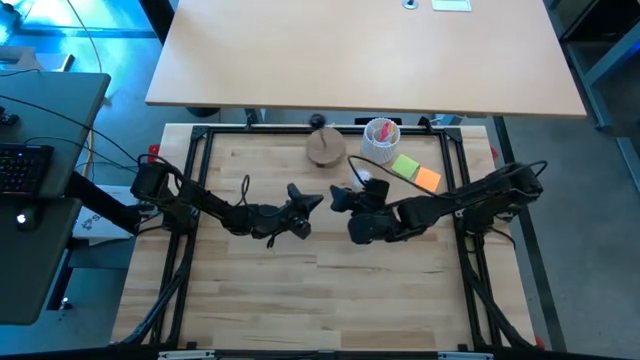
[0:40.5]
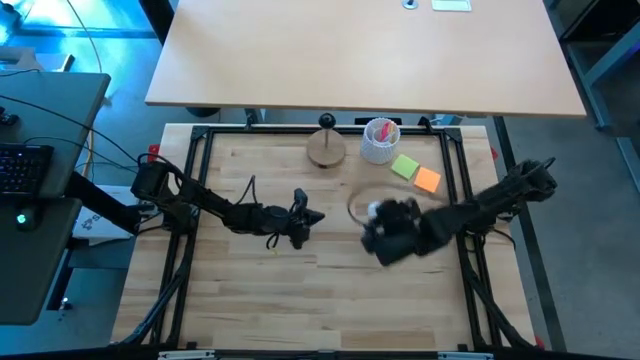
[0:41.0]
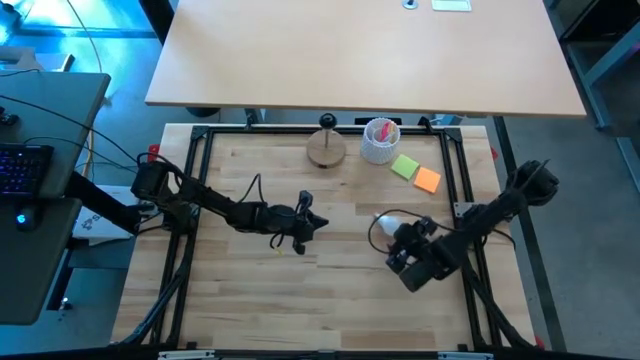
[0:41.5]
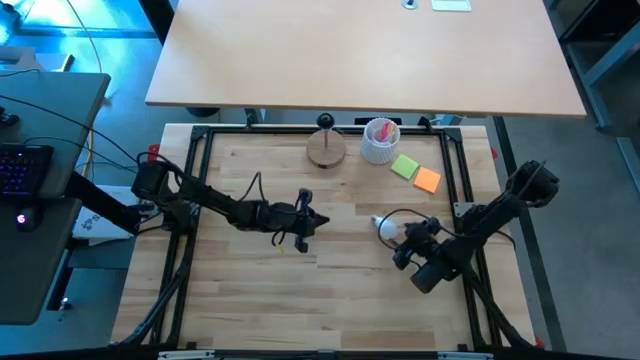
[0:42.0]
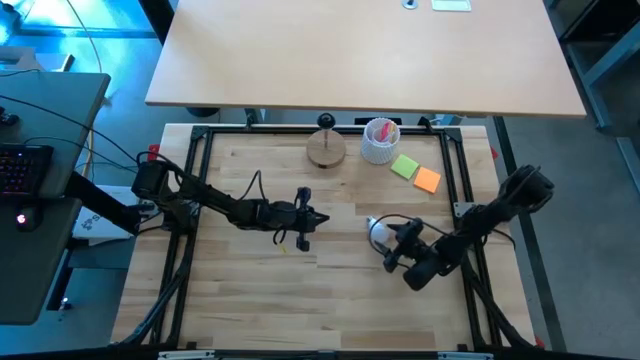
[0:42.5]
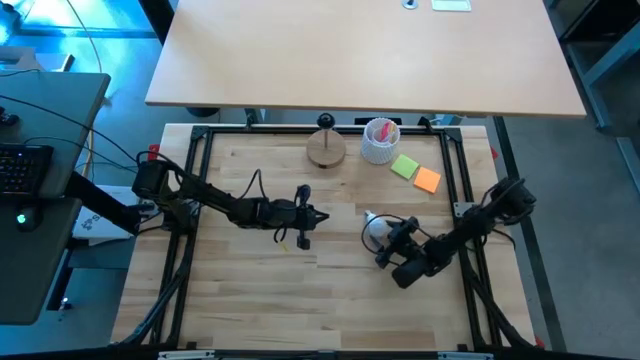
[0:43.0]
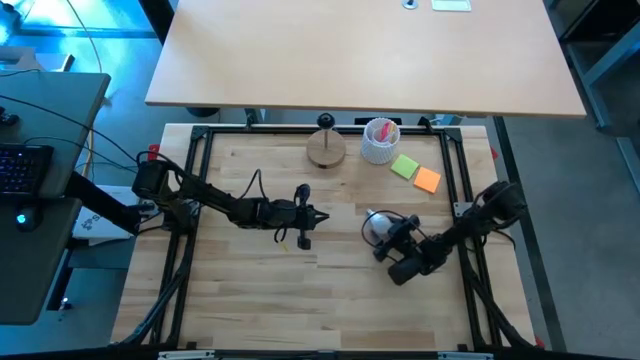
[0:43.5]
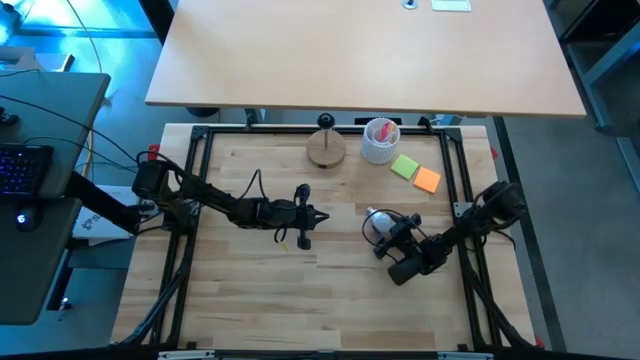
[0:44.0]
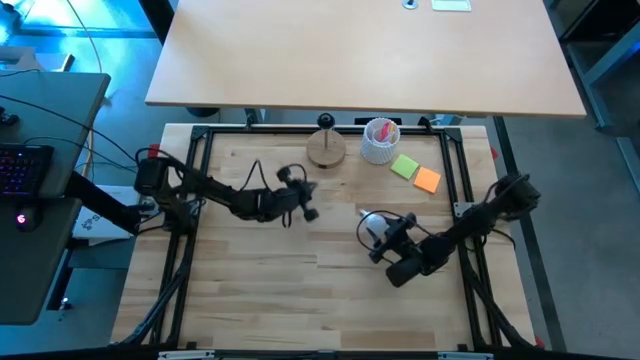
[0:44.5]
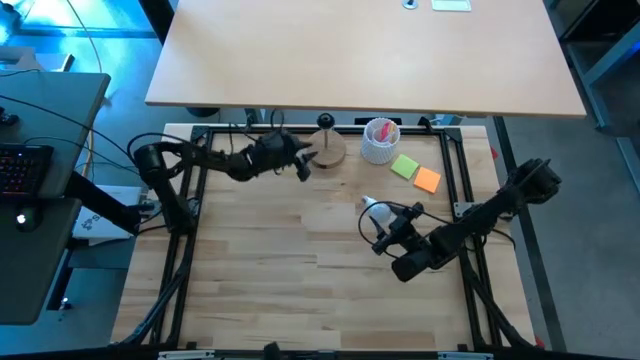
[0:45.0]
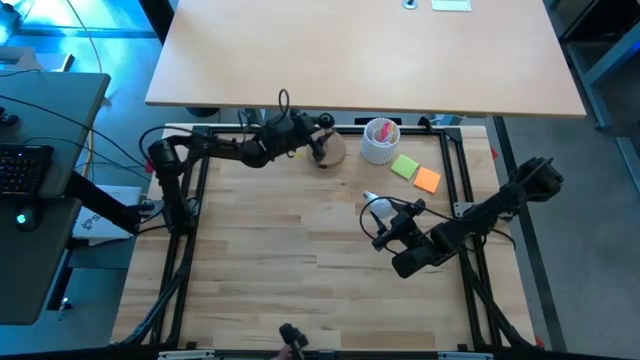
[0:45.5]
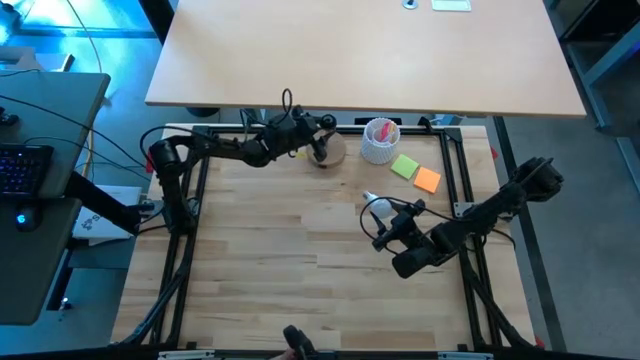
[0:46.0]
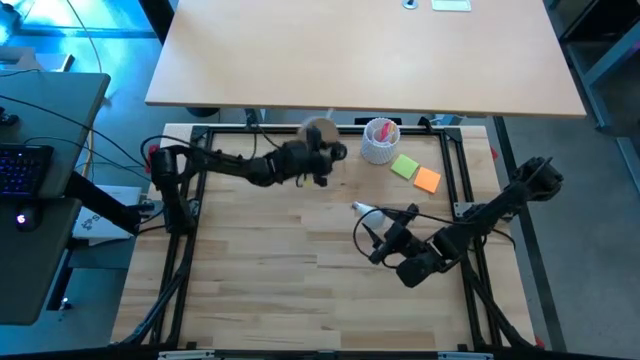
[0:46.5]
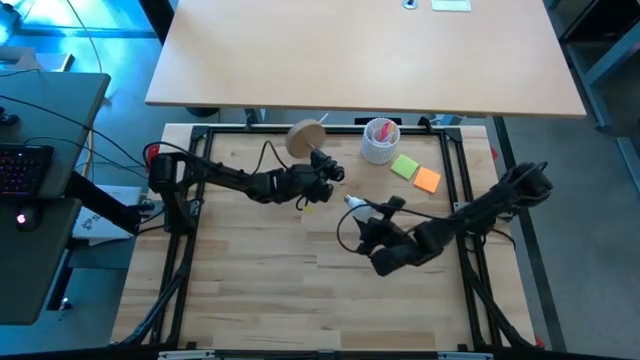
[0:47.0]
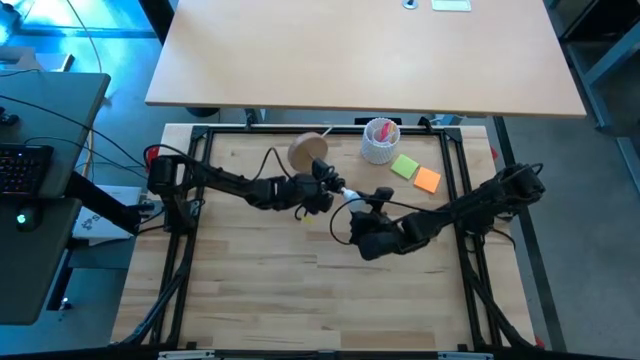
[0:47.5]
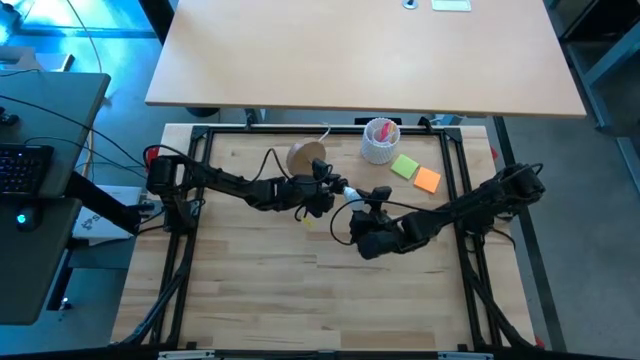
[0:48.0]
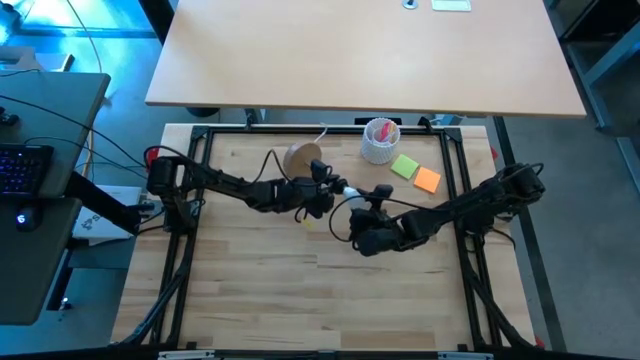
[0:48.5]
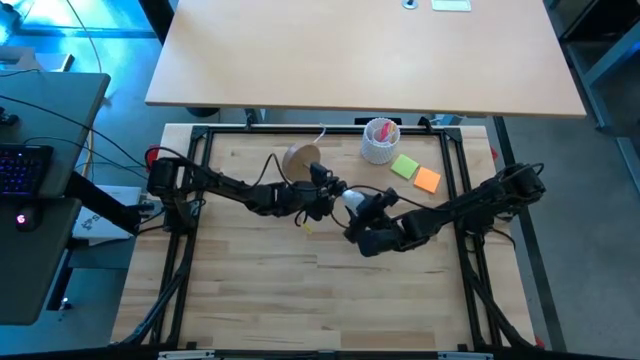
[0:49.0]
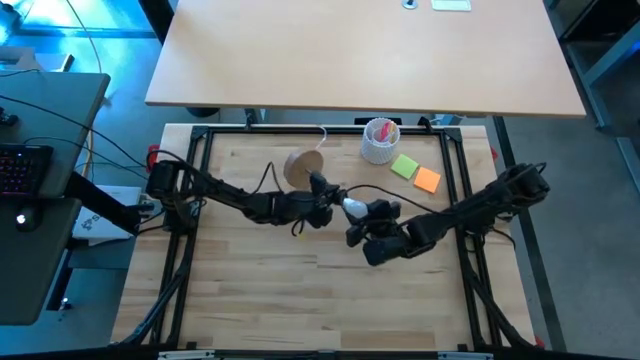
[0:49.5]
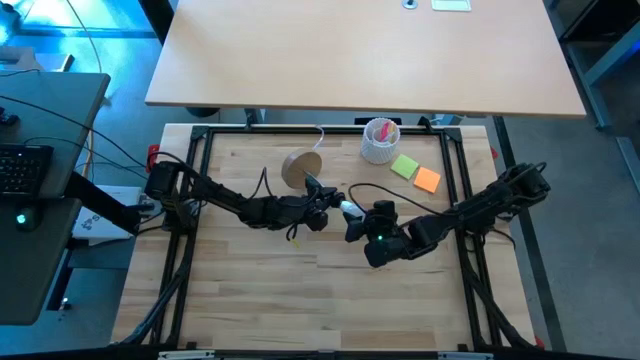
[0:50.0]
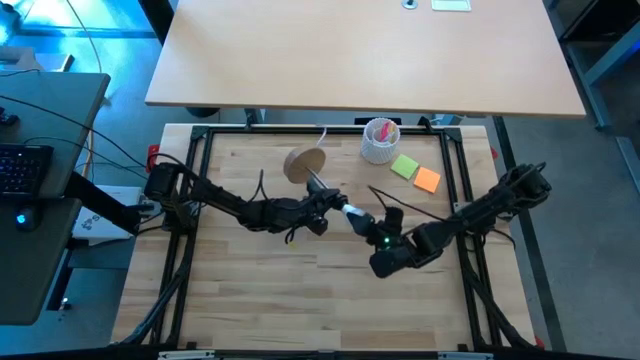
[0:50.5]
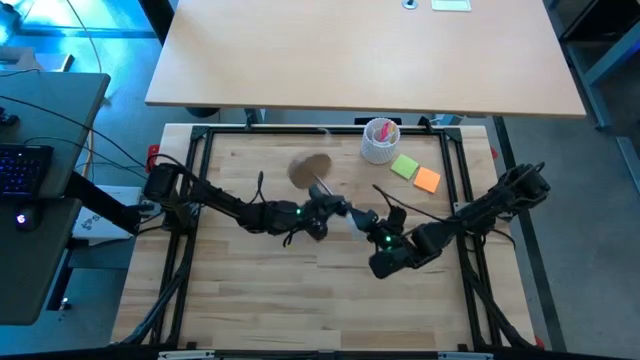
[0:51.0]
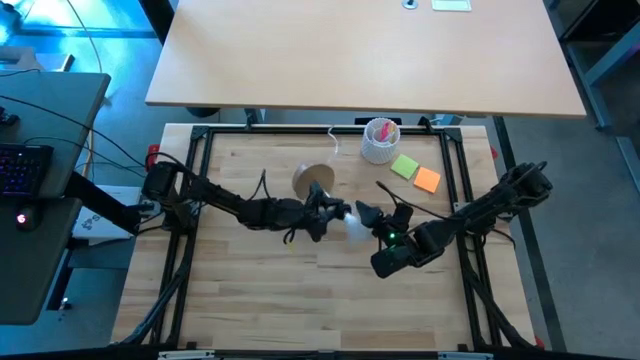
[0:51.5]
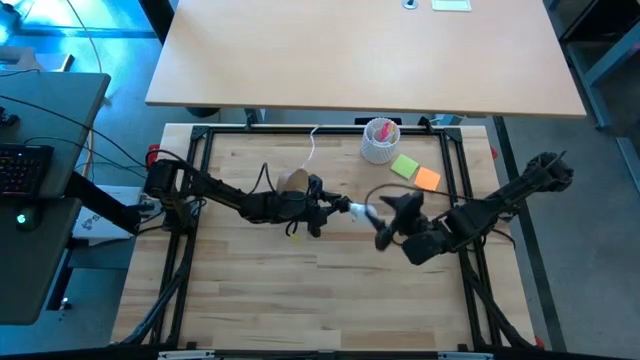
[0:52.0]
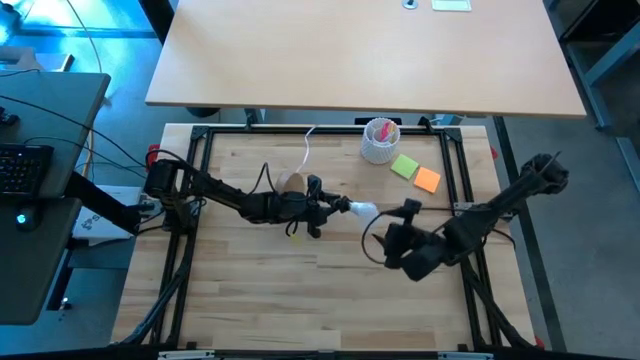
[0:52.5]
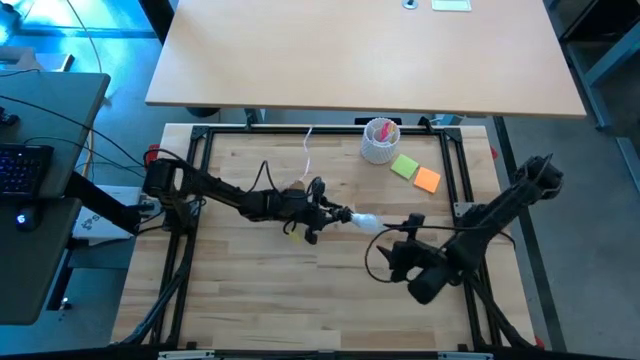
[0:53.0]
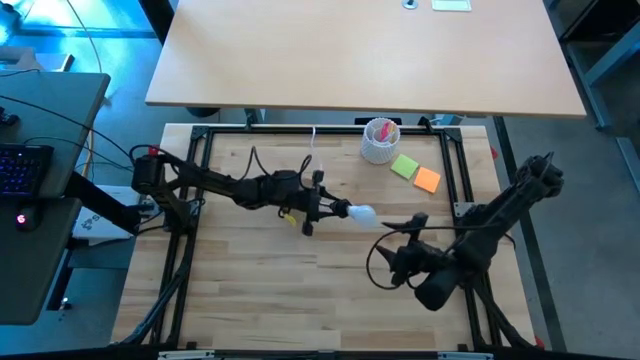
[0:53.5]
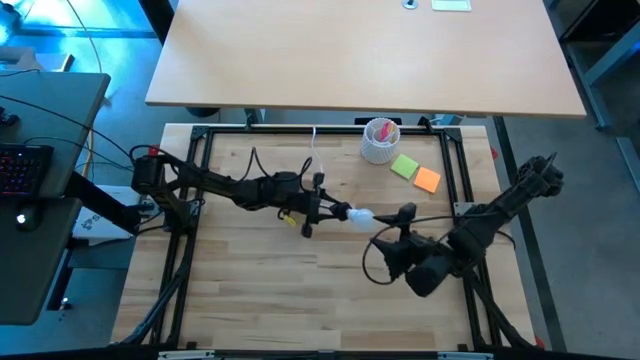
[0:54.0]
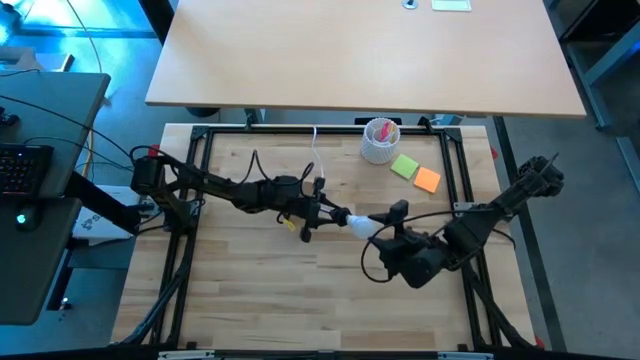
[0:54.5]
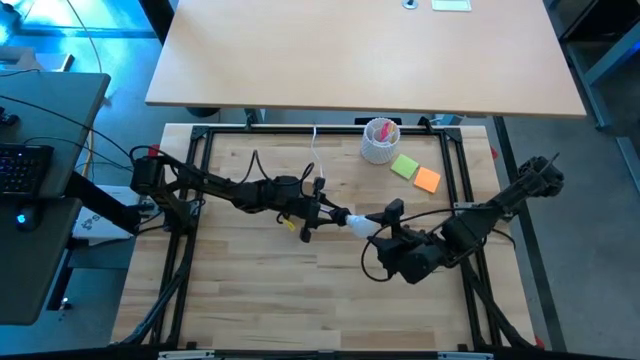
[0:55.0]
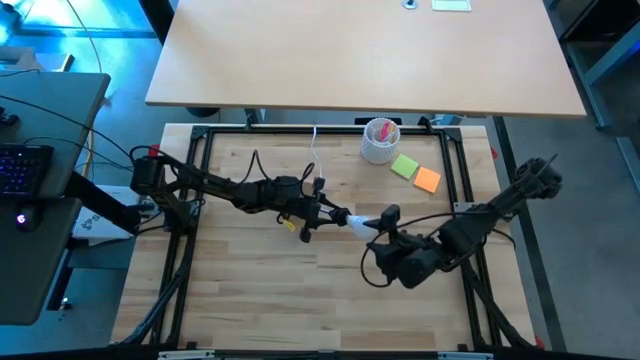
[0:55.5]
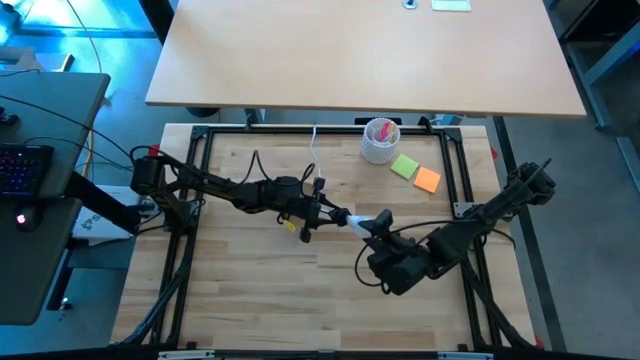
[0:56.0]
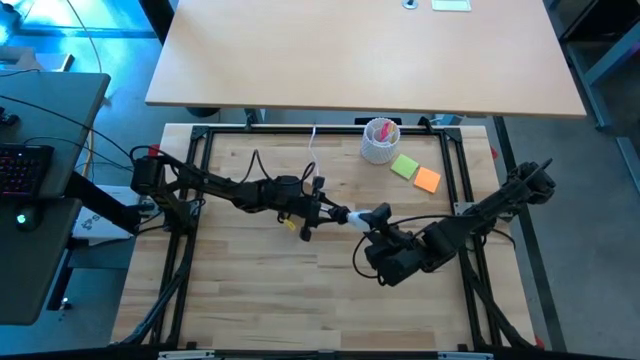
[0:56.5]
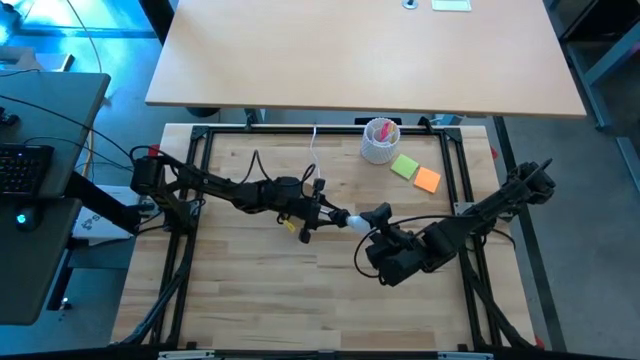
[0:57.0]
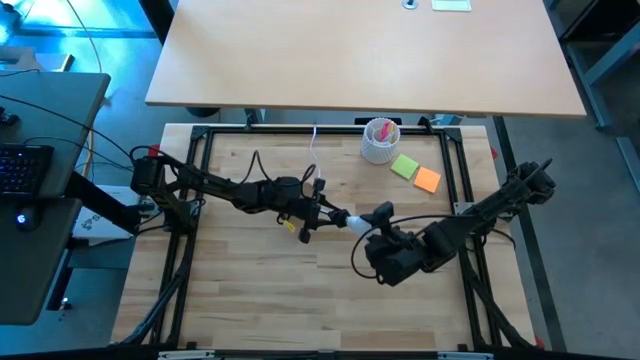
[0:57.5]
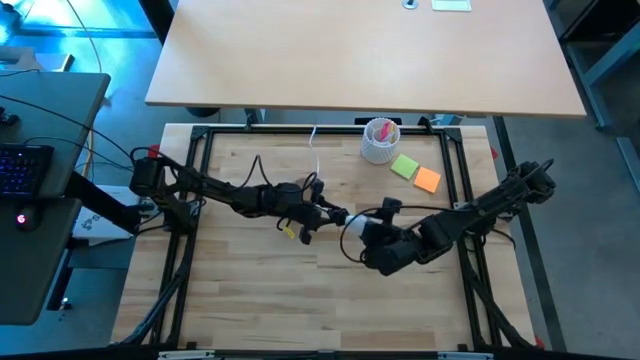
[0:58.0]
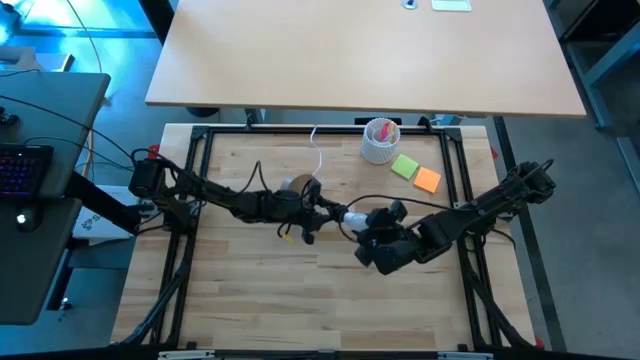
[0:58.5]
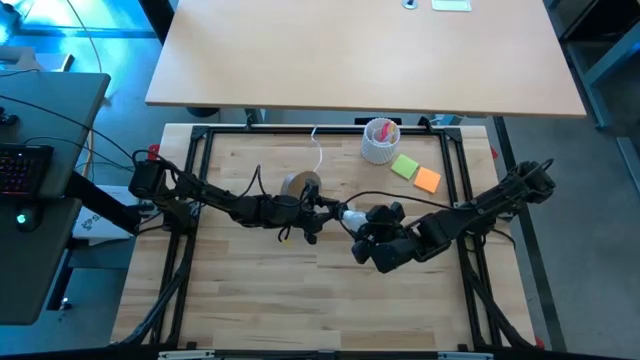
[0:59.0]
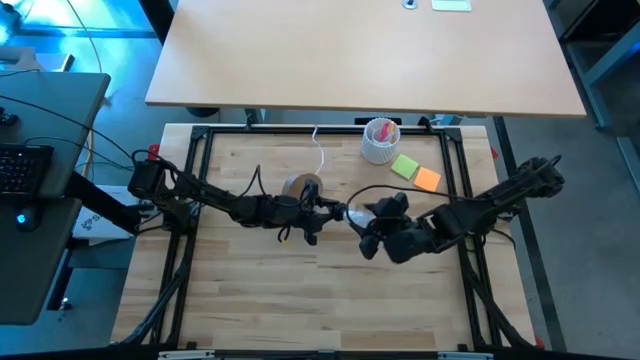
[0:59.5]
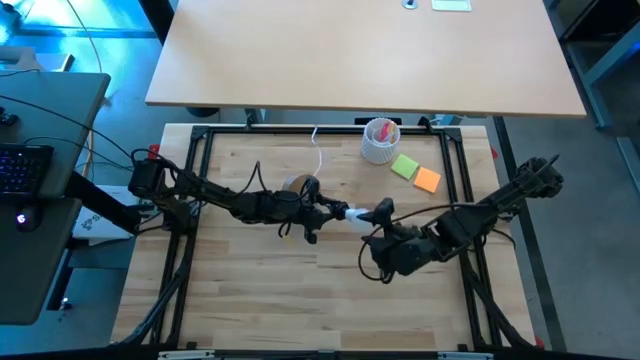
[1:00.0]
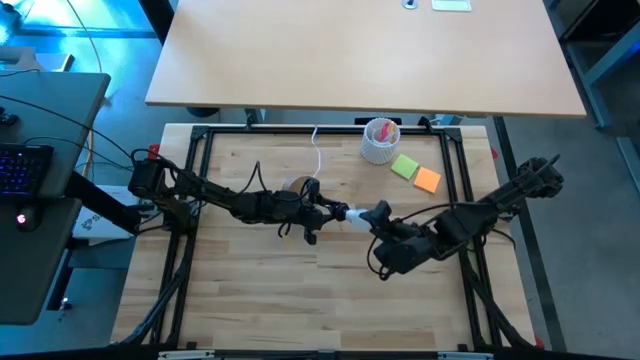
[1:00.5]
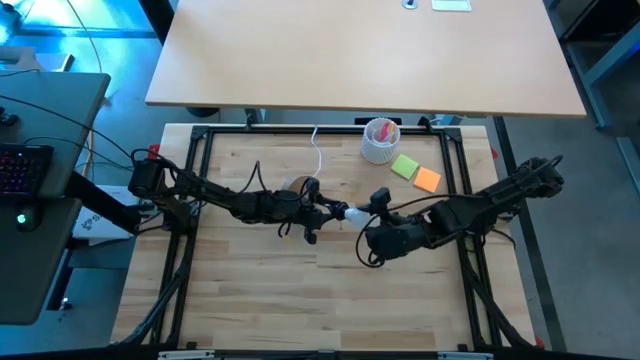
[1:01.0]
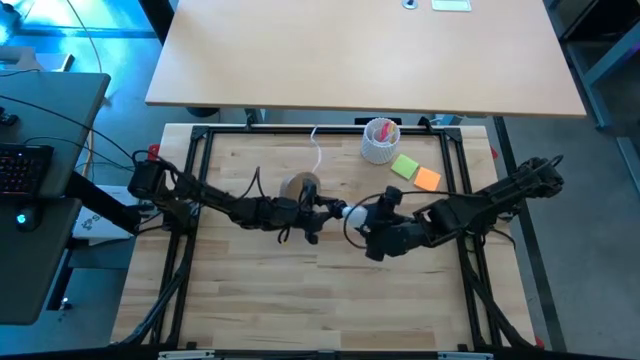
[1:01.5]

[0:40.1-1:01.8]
Task: Screw lightbulb
Insert the light bulb into the lamp
